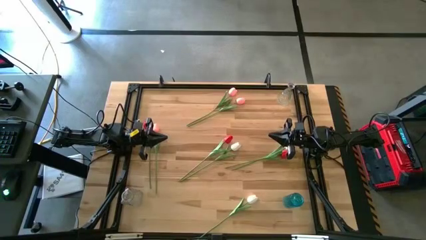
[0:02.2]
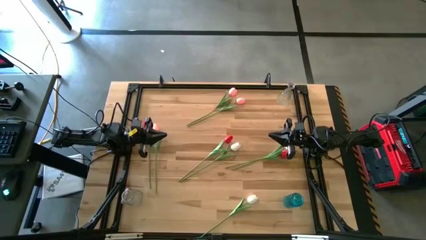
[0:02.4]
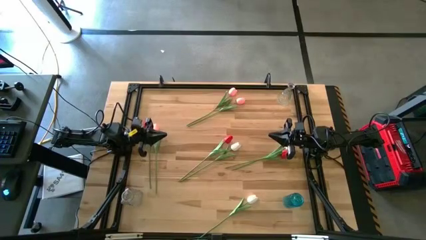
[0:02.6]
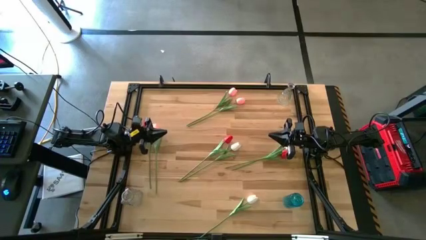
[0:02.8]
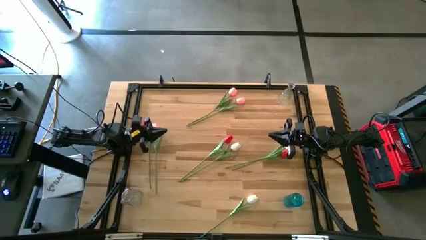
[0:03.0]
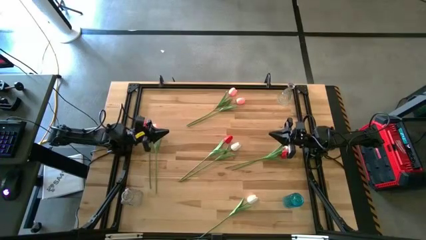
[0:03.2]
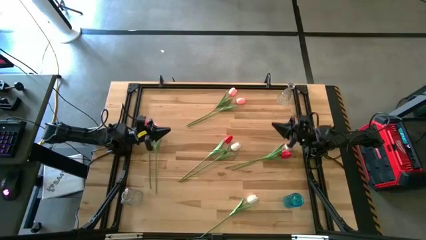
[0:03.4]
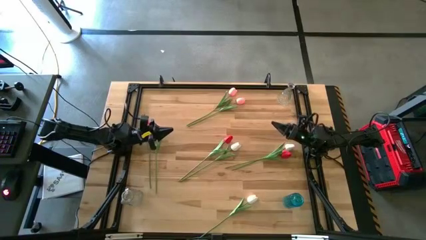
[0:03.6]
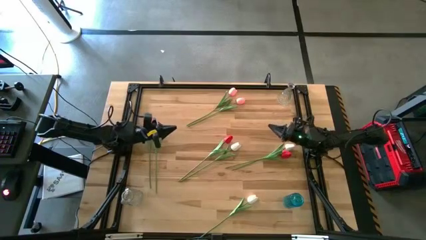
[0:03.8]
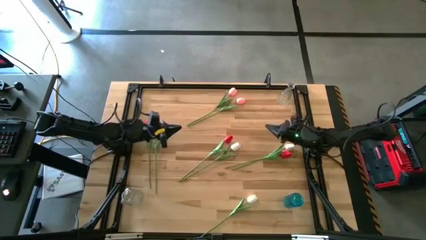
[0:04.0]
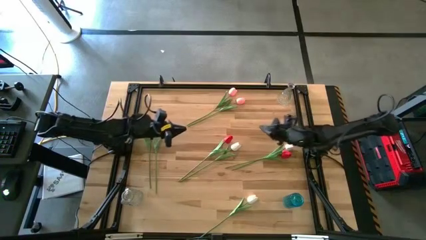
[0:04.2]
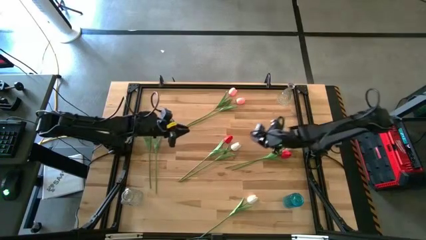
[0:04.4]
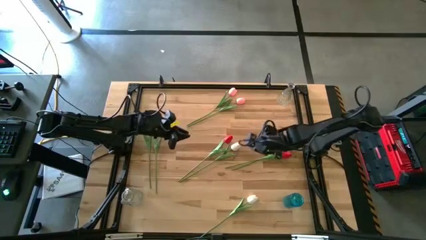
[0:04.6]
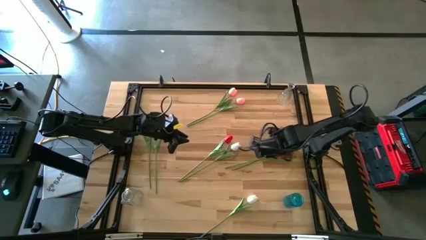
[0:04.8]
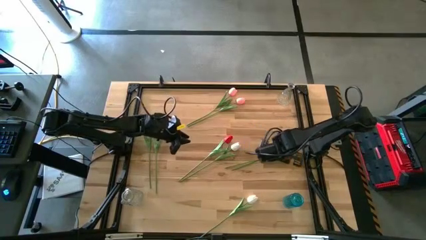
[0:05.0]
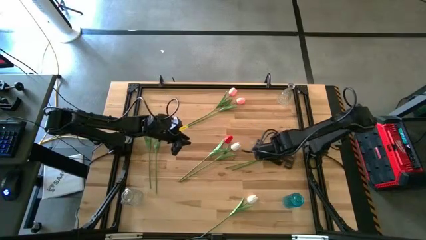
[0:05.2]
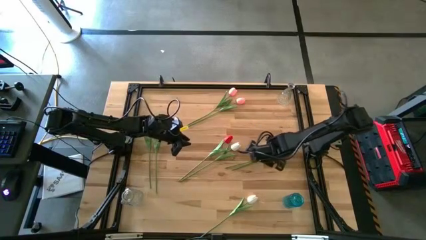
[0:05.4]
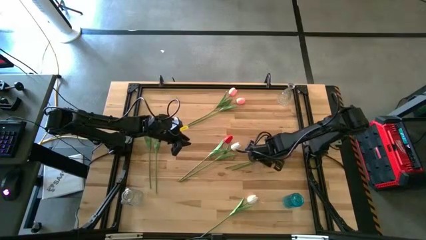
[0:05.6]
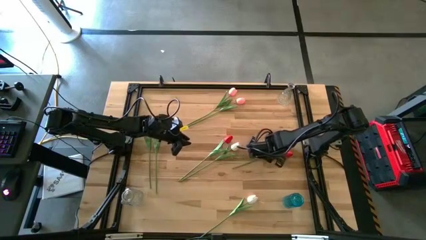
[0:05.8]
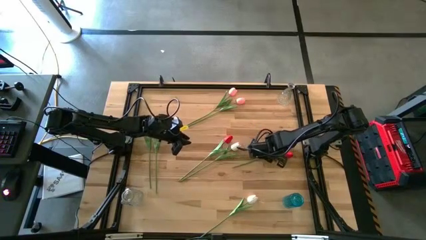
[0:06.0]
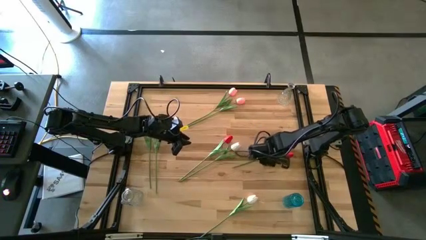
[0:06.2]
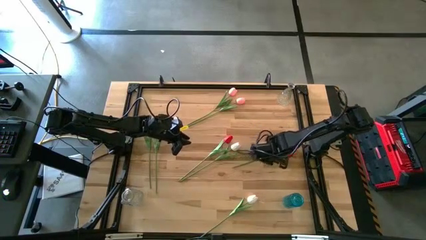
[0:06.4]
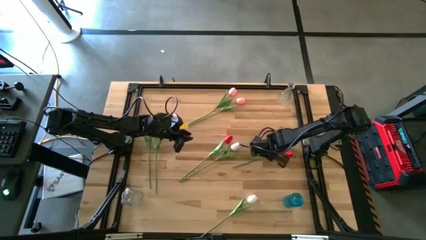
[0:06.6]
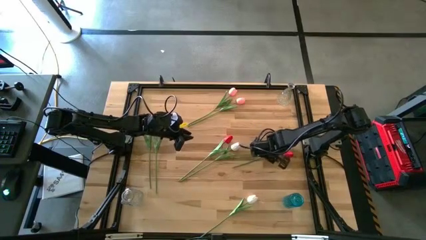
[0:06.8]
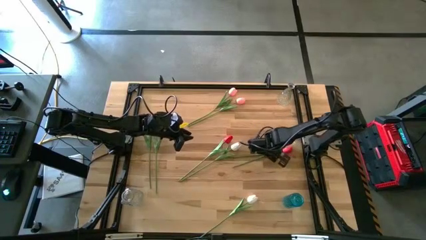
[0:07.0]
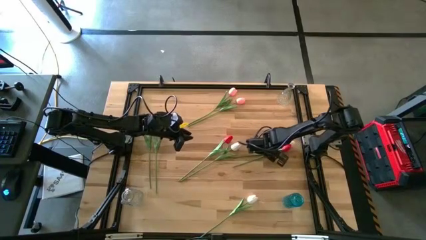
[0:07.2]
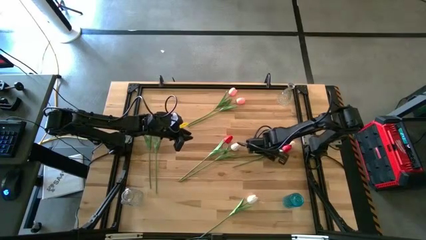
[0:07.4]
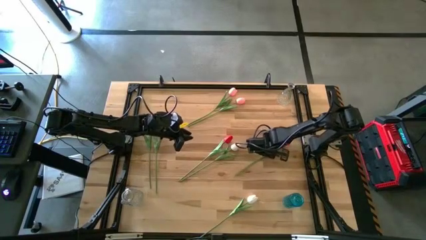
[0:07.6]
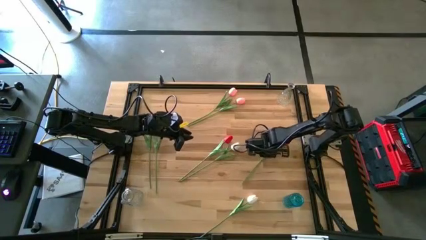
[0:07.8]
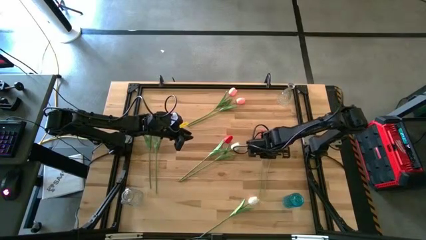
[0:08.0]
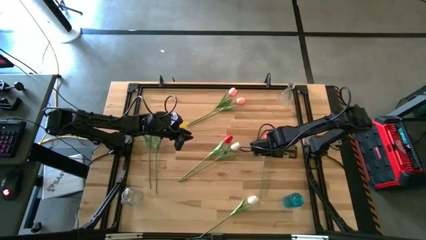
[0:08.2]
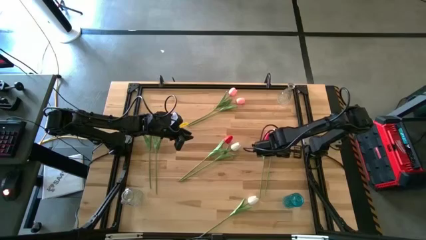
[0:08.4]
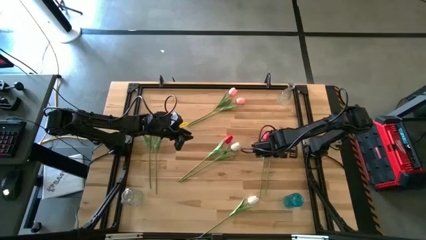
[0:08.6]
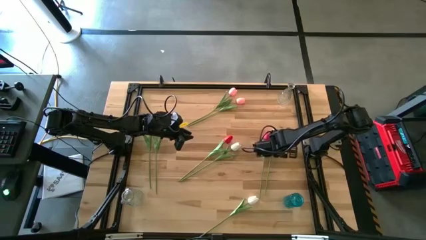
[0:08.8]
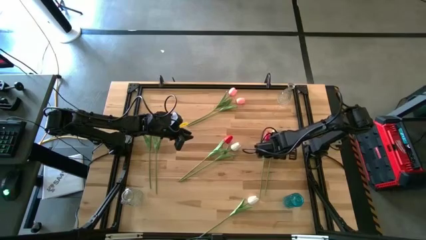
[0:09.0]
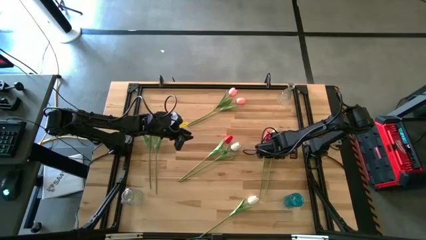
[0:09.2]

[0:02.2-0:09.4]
Task: Sort flowers into vase by color
Put the right red flower into the top transparent vase

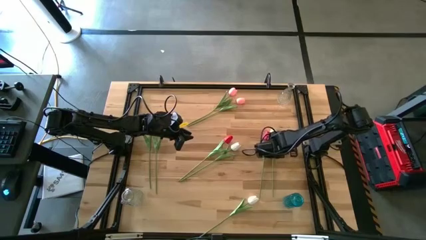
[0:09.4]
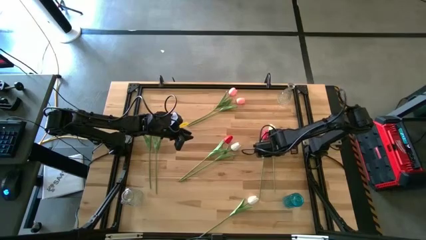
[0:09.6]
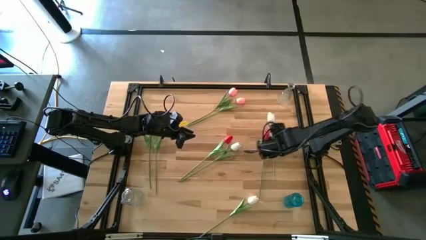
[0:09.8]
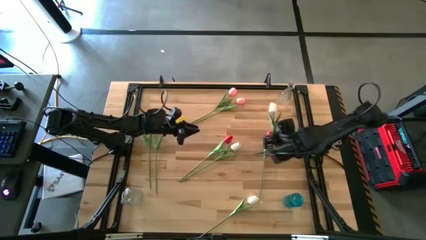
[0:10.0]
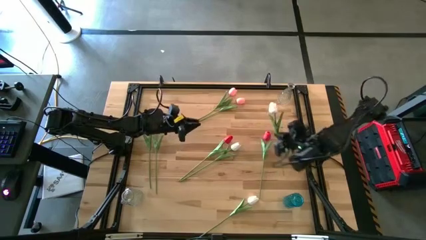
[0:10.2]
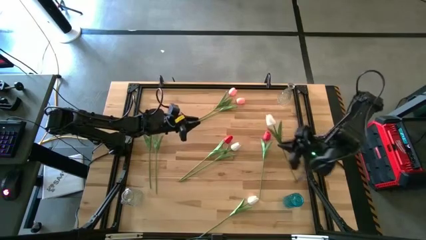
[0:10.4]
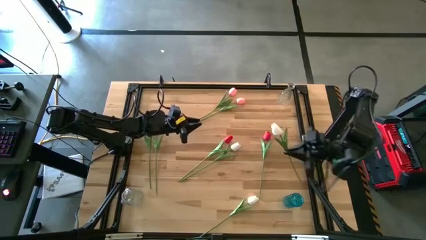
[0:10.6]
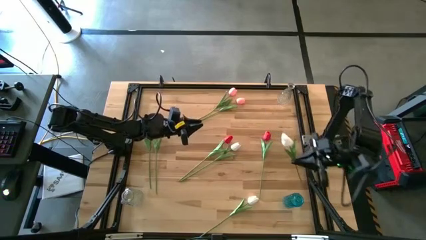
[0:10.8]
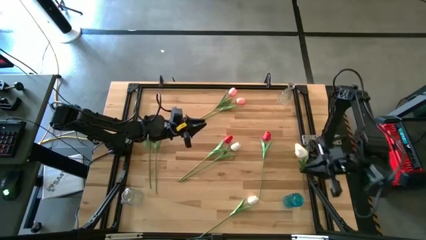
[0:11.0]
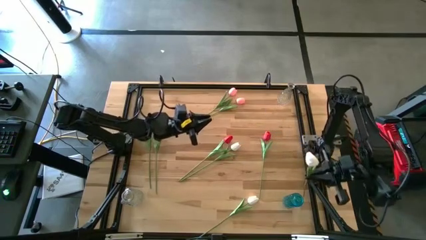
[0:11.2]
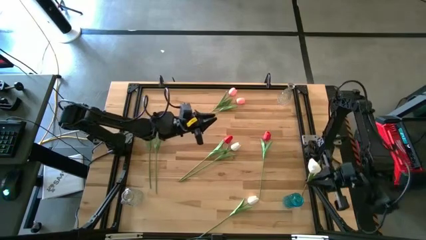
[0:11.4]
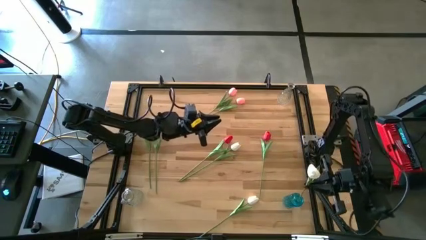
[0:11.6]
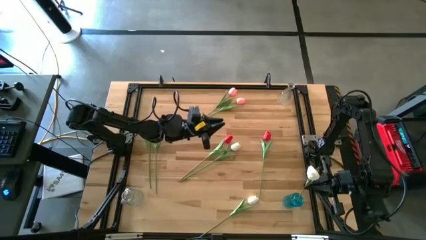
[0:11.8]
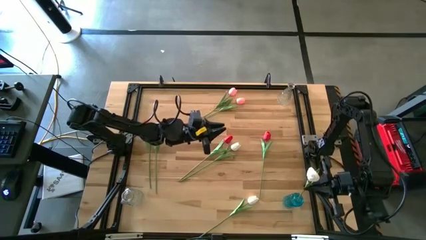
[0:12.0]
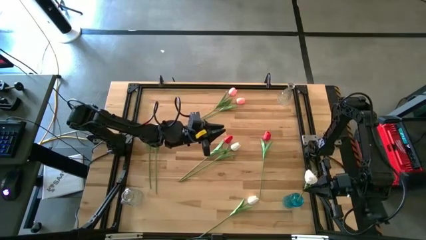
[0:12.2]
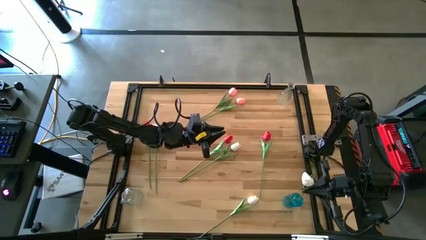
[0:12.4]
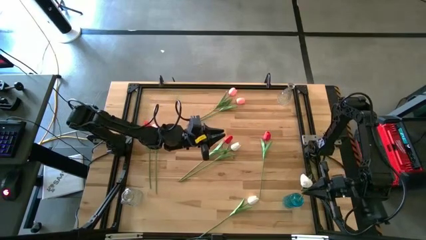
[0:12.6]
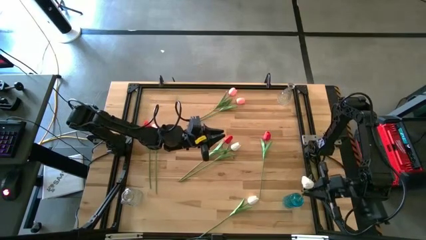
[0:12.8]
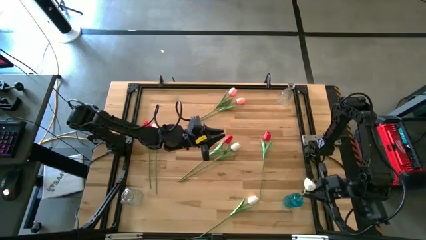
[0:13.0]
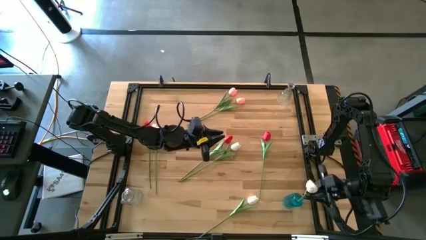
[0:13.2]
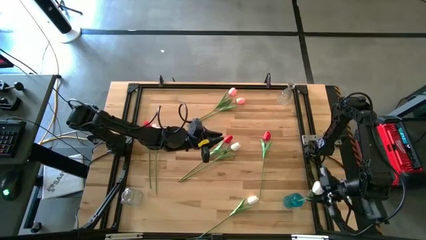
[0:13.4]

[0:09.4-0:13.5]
Put the top right white flower into the blue vase

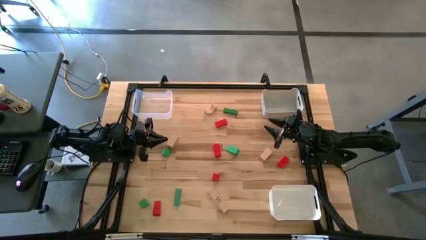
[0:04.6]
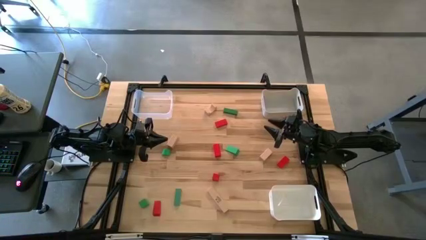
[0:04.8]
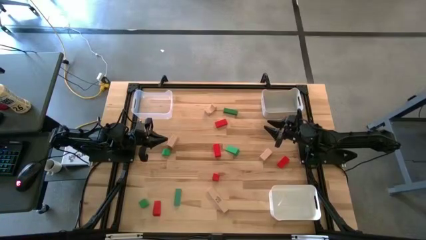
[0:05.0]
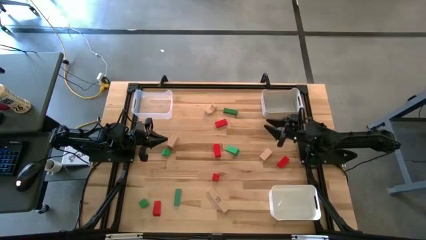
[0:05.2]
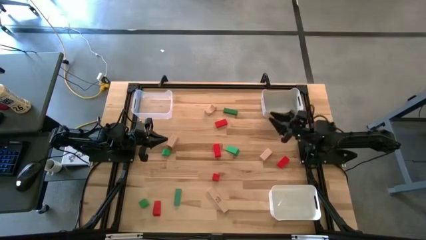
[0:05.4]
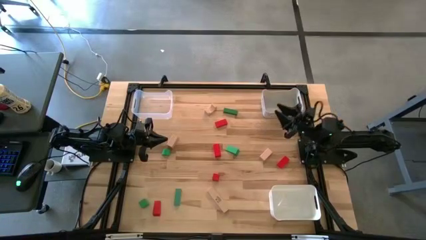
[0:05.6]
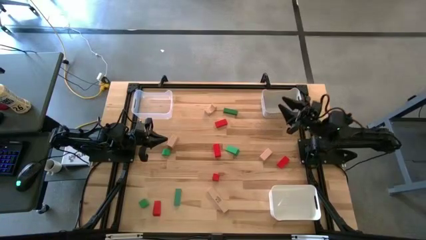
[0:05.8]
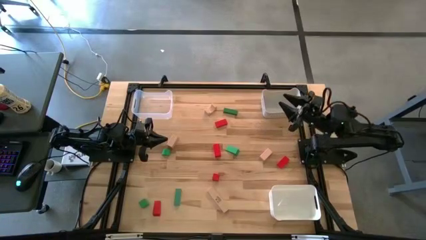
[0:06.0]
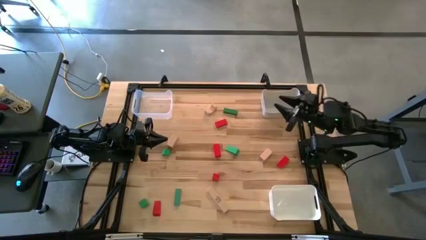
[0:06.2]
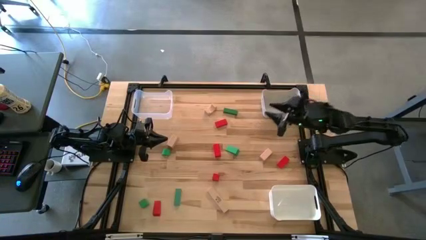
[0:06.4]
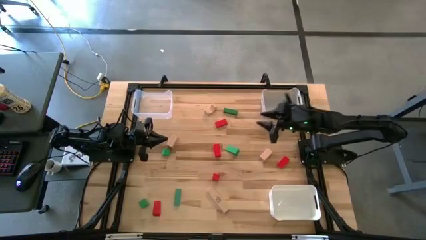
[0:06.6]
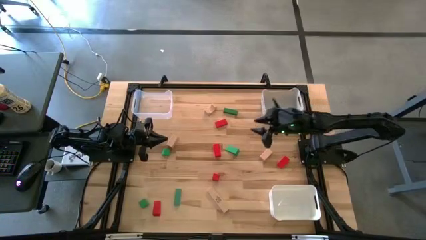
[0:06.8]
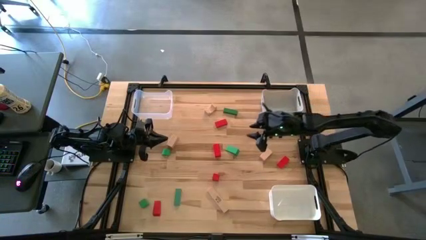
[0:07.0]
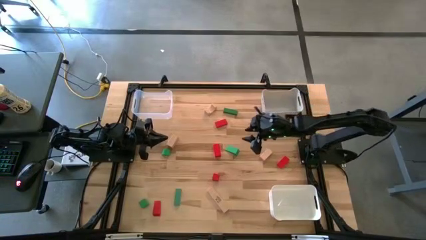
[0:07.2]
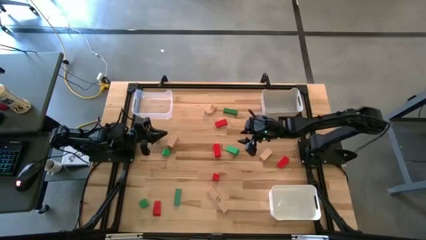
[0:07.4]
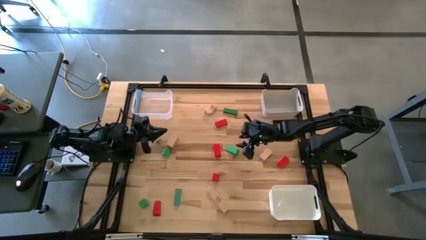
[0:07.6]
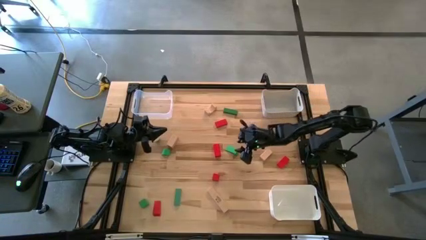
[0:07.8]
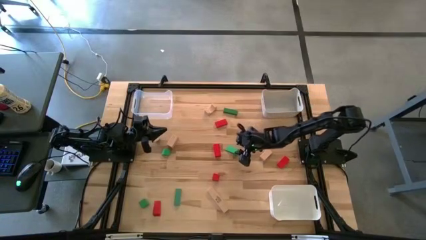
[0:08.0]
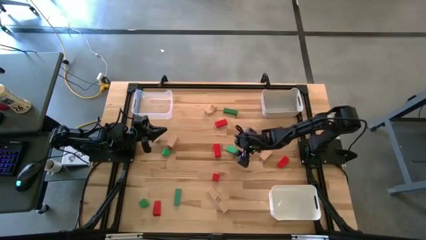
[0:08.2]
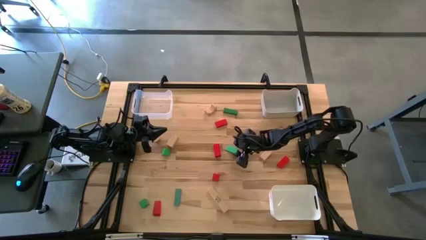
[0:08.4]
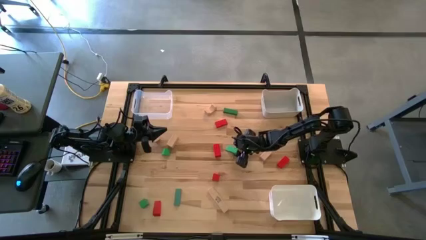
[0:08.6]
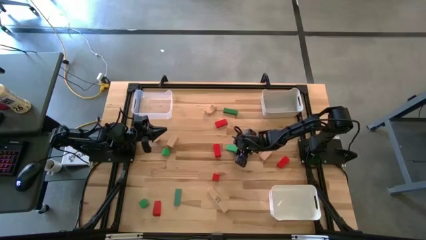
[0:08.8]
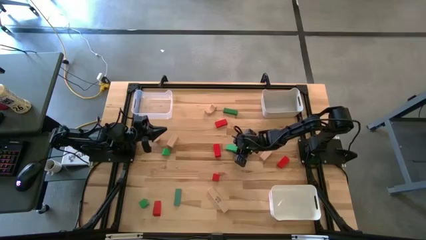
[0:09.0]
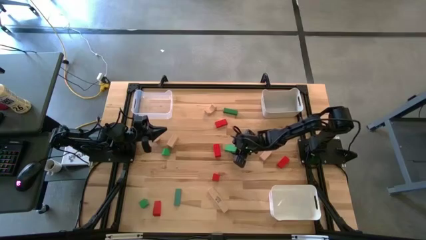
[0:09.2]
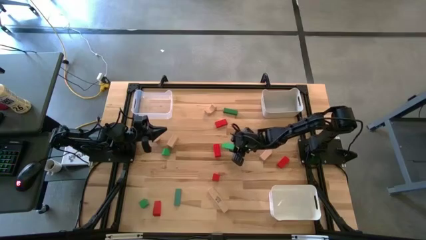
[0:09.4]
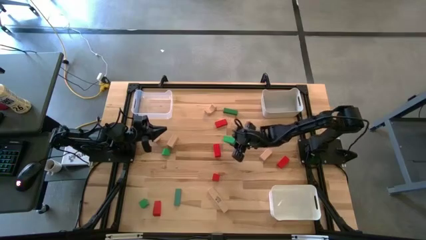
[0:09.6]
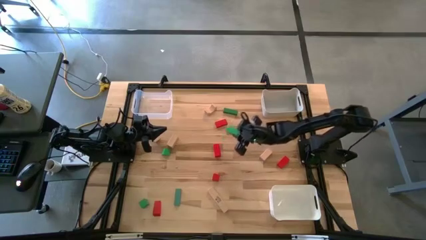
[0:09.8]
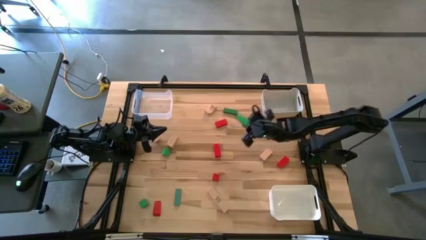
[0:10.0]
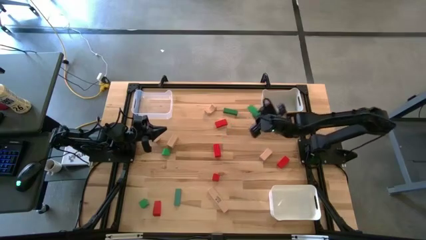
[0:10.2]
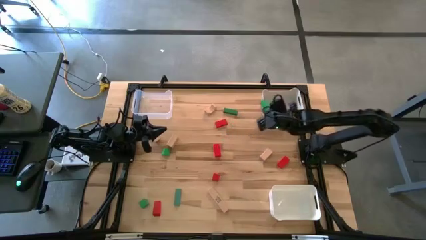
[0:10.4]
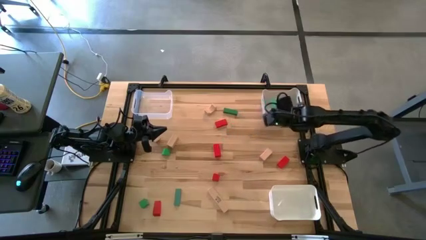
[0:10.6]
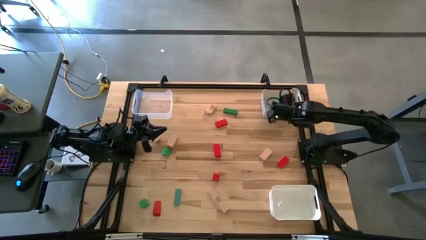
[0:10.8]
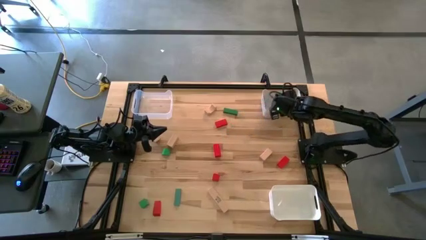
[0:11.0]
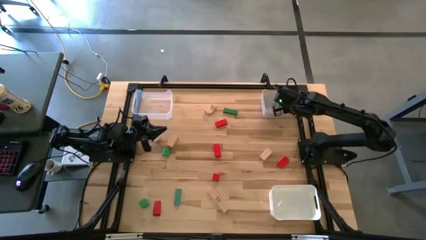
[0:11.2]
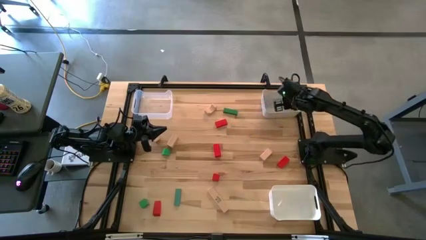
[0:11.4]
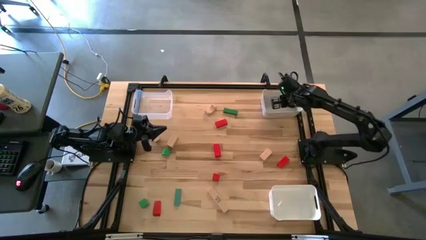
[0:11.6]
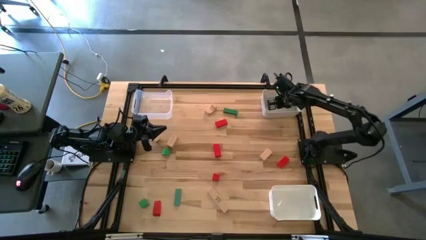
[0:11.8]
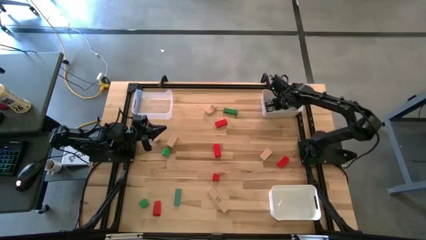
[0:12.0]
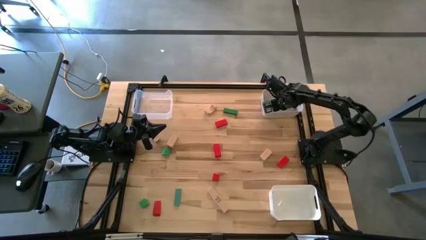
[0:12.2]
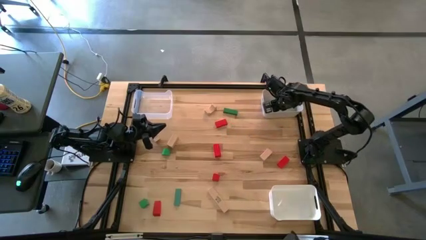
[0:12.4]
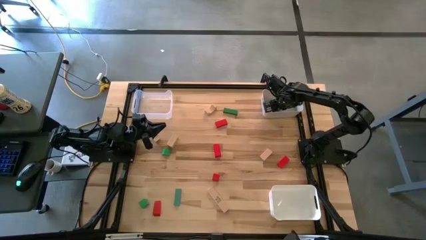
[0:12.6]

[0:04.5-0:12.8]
Task: Sort & place blocks by color
Put the green block into the gray bin
